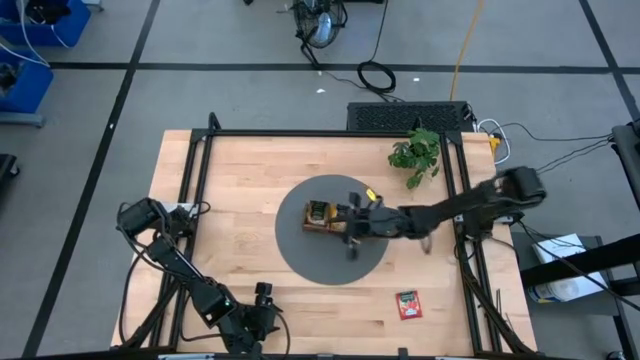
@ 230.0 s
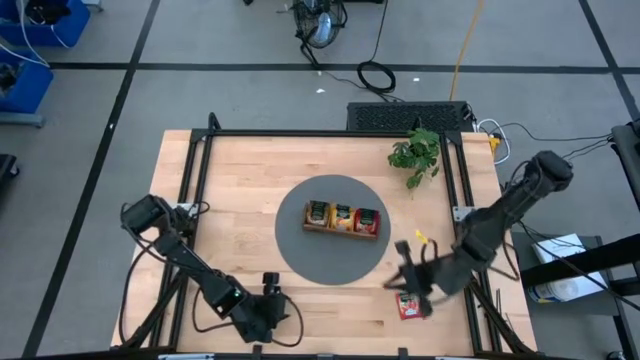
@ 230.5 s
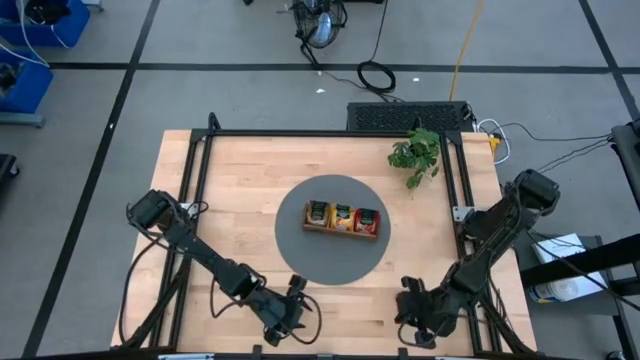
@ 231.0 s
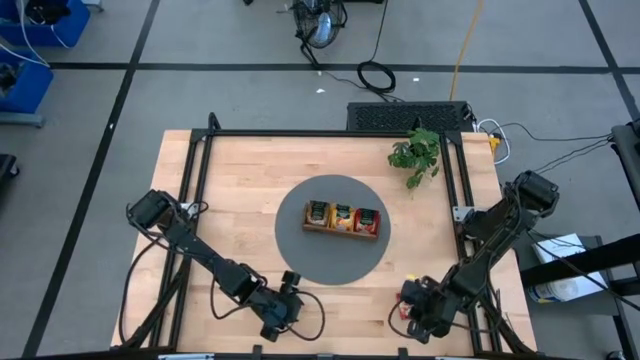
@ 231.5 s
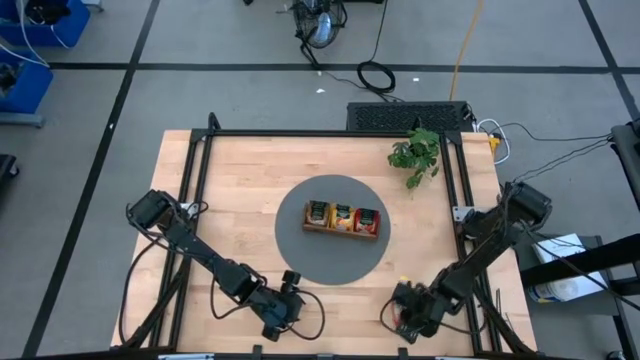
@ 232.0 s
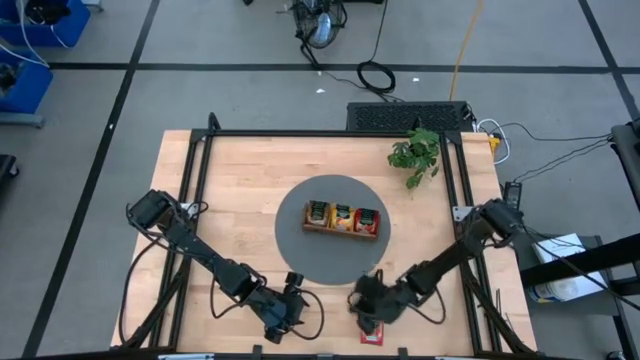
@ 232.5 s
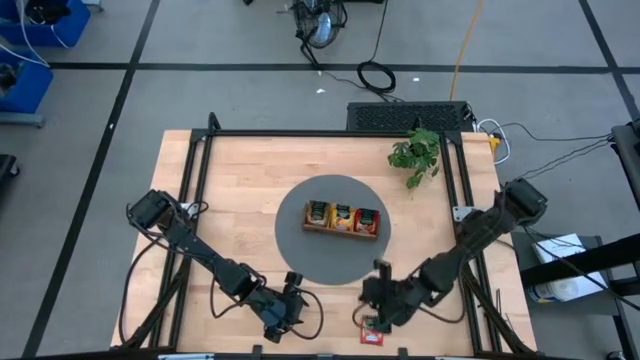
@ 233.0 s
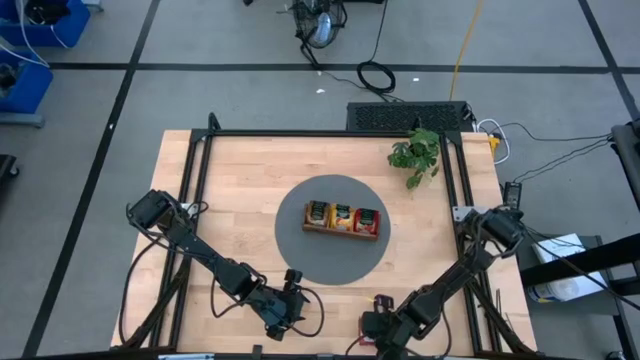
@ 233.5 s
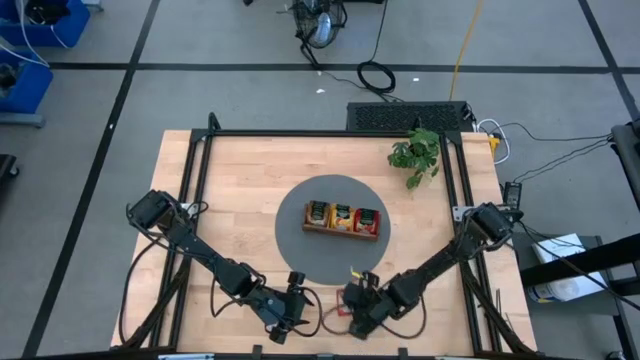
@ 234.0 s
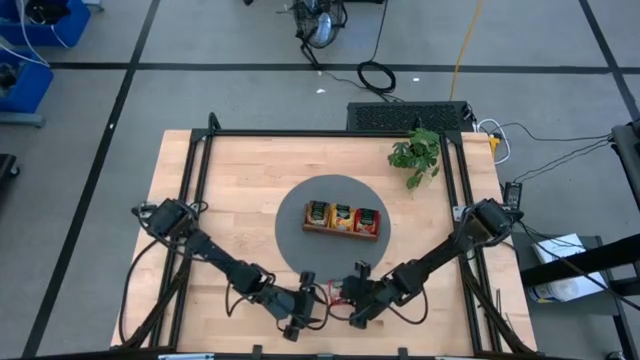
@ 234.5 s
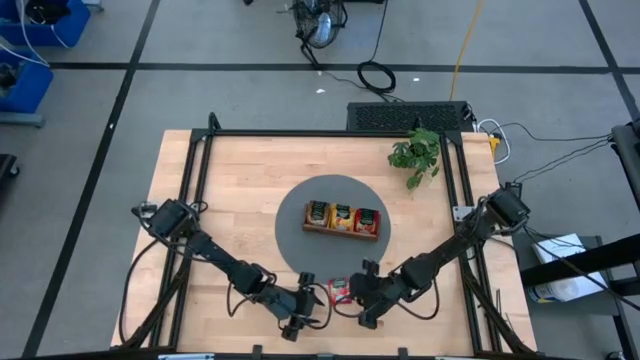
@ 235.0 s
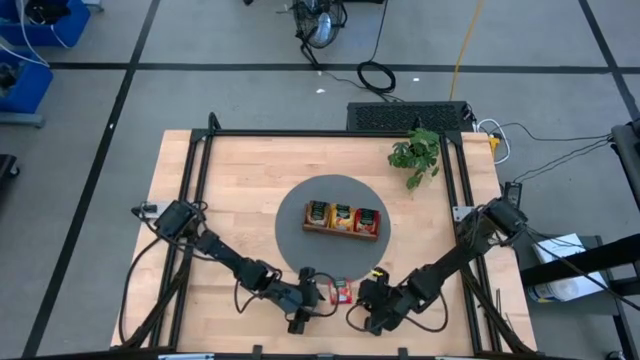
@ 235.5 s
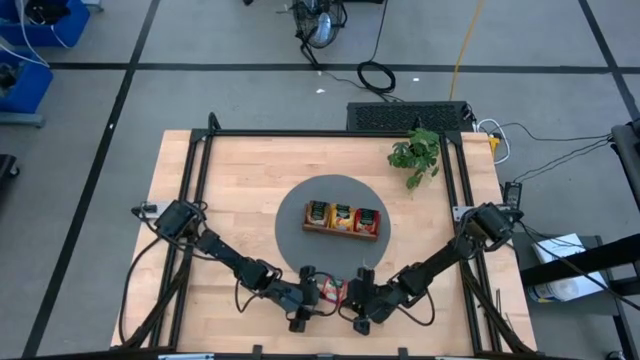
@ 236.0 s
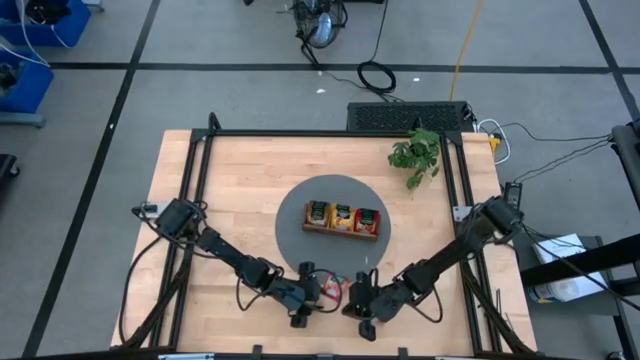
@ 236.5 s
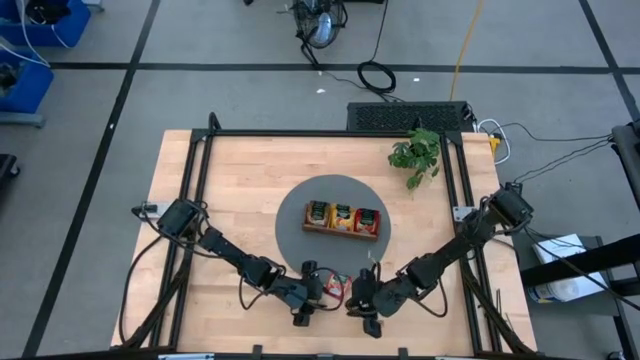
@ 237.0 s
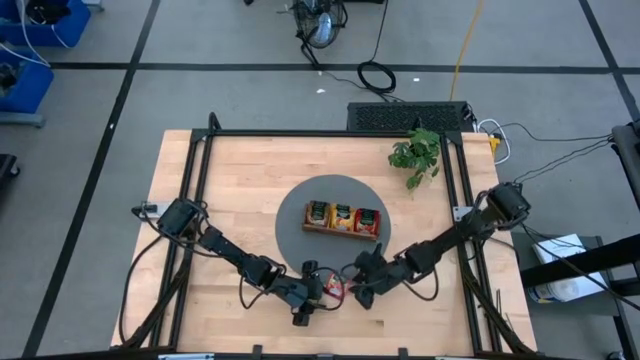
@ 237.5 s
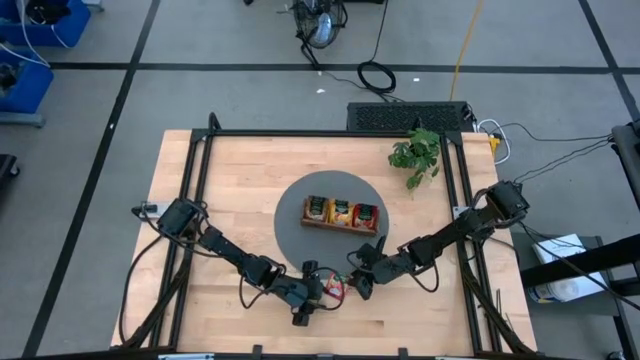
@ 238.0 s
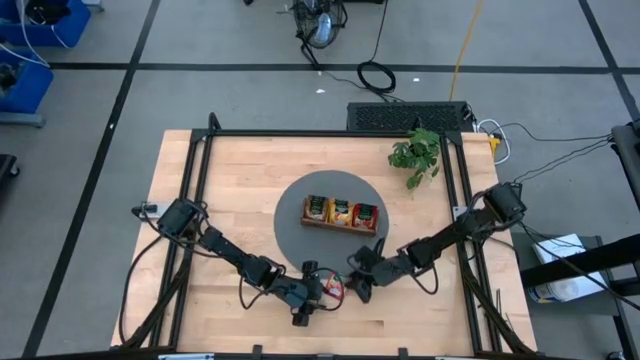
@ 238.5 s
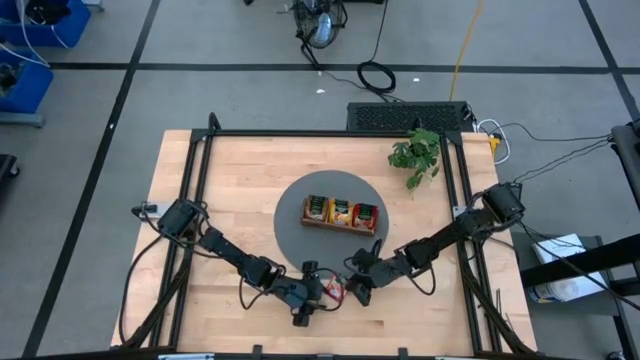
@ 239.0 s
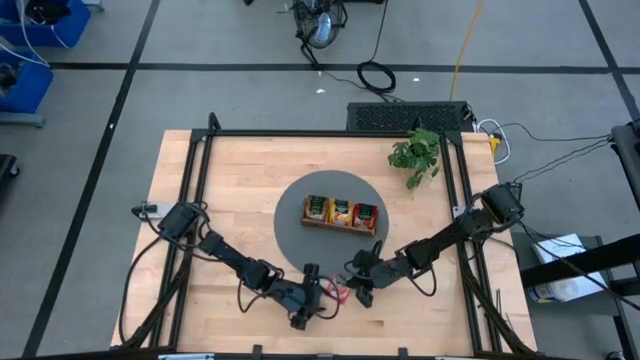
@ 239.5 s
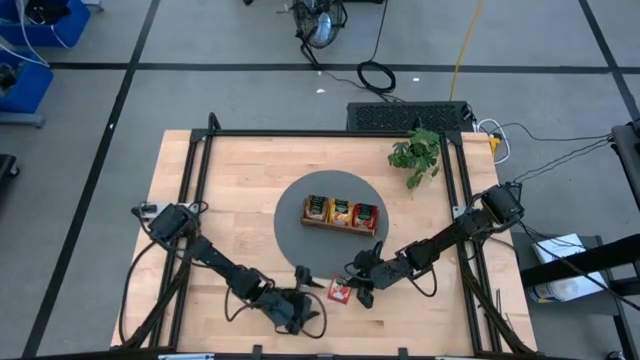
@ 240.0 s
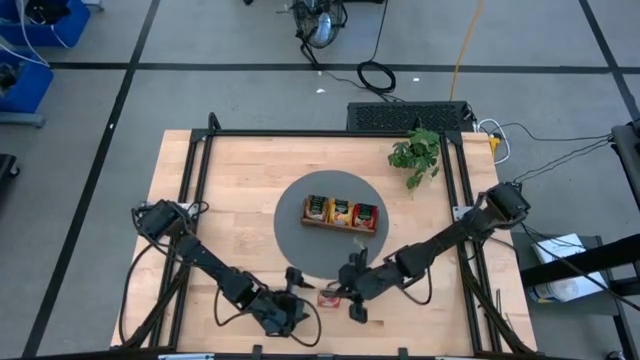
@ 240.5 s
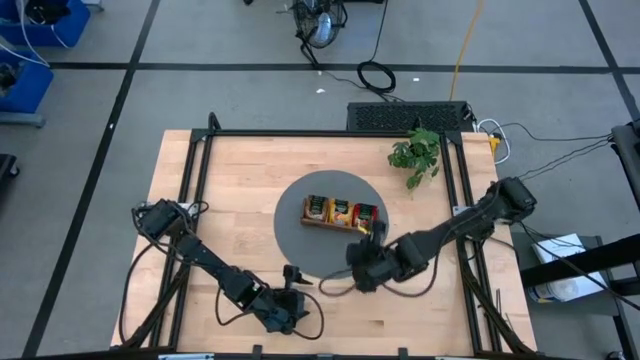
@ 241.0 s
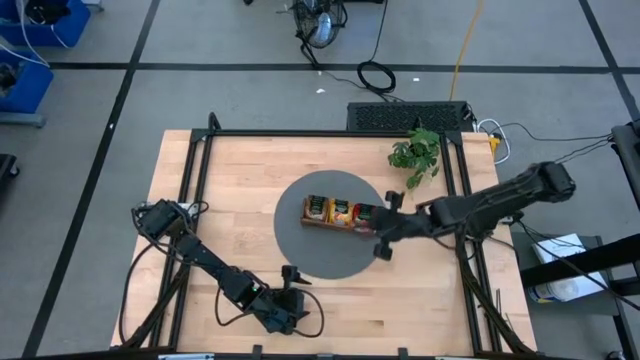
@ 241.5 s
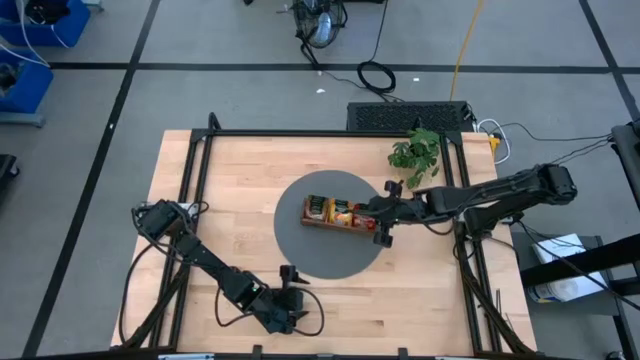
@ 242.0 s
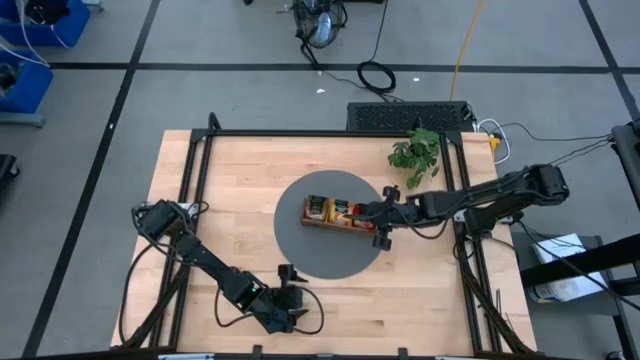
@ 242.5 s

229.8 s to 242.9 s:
Task: Pick & Place Tea
Put the red tea bag to the right section into the wooden organizer

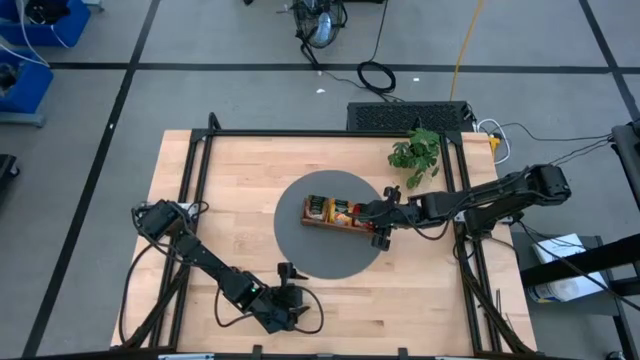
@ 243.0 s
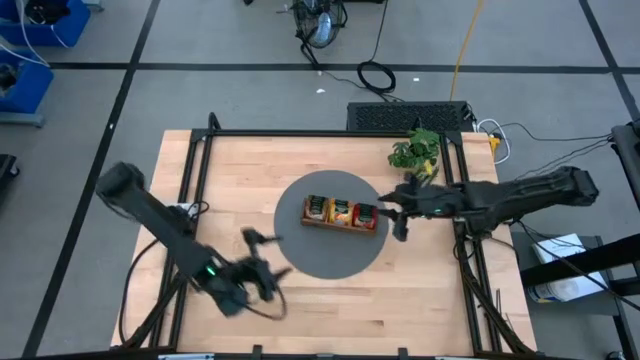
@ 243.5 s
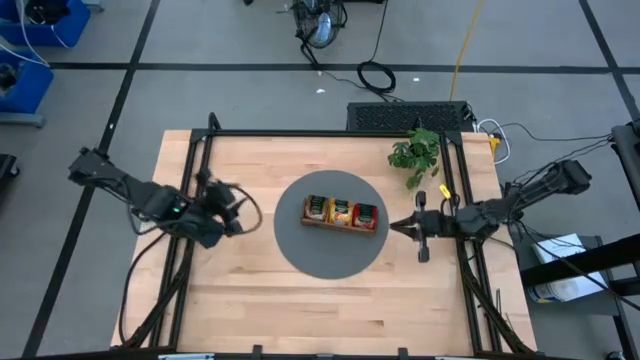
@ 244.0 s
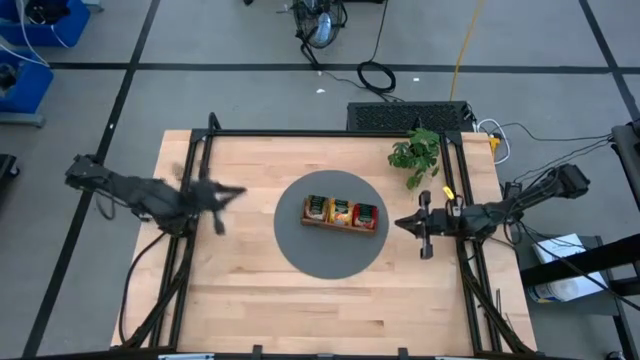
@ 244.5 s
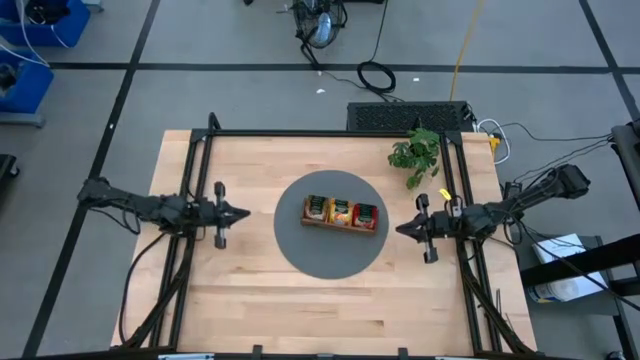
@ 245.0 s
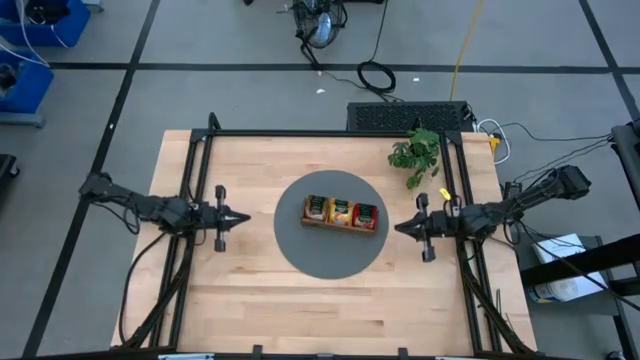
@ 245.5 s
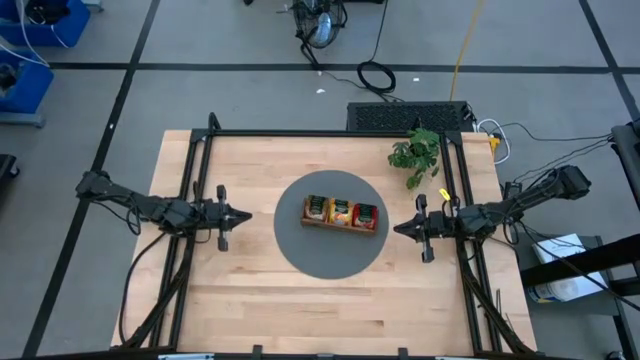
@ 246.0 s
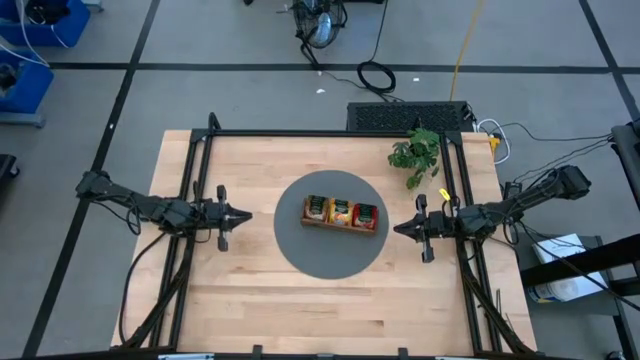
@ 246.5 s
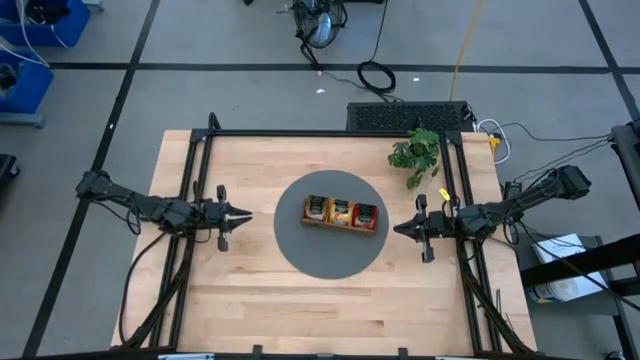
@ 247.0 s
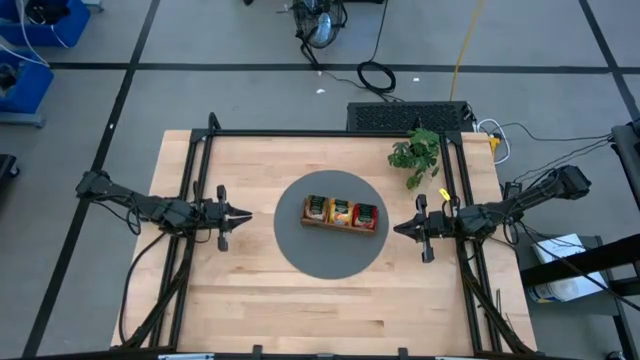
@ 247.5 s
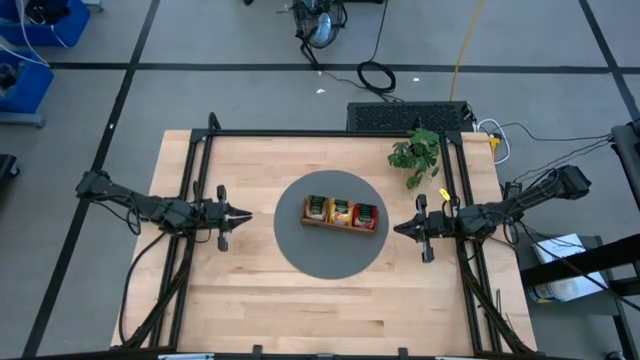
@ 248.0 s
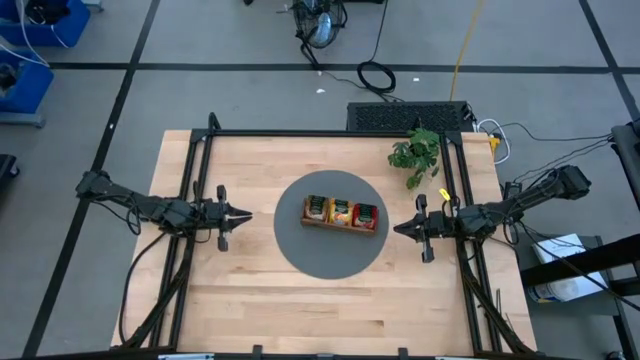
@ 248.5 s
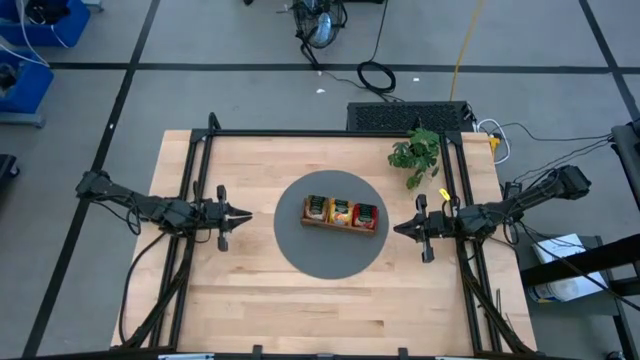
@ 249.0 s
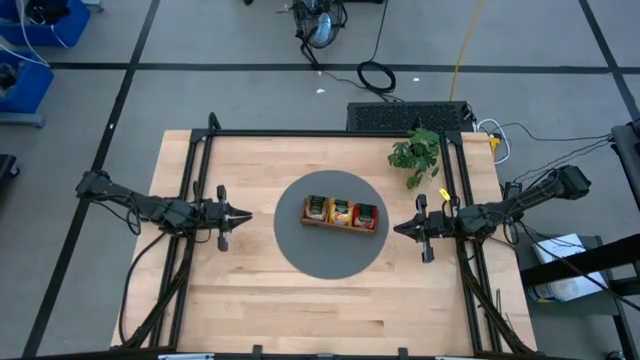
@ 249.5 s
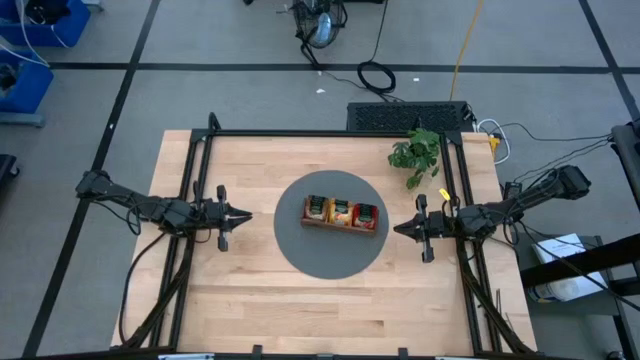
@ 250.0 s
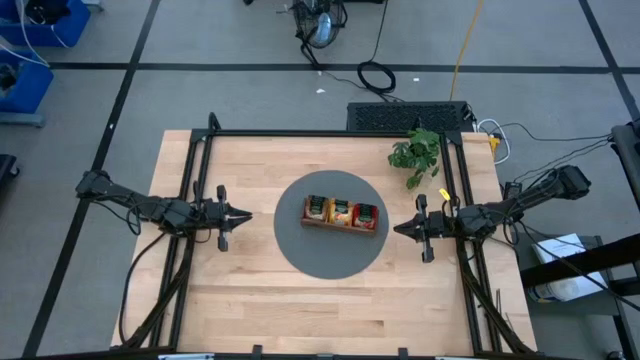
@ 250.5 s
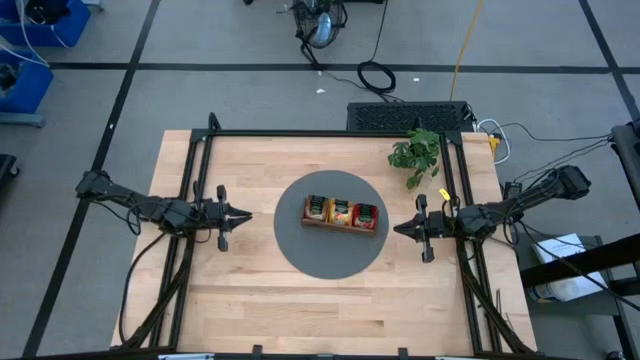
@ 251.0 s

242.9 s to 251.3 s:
Return to Home Position
